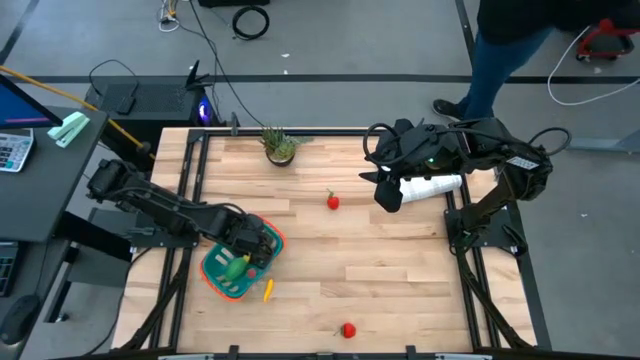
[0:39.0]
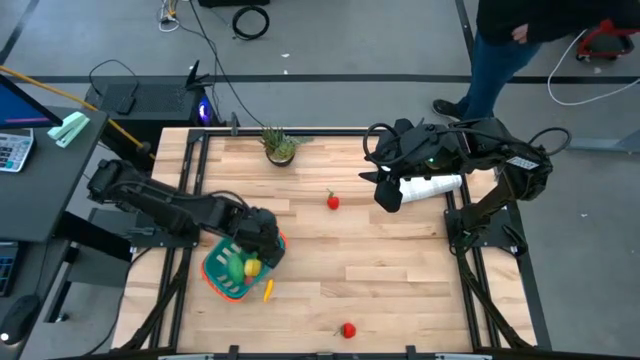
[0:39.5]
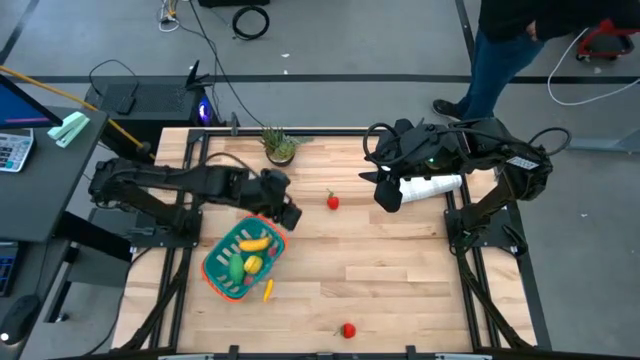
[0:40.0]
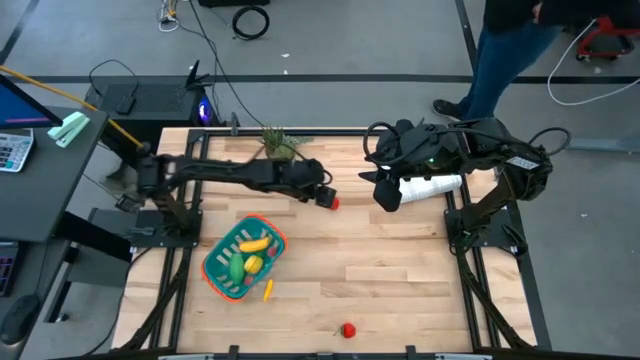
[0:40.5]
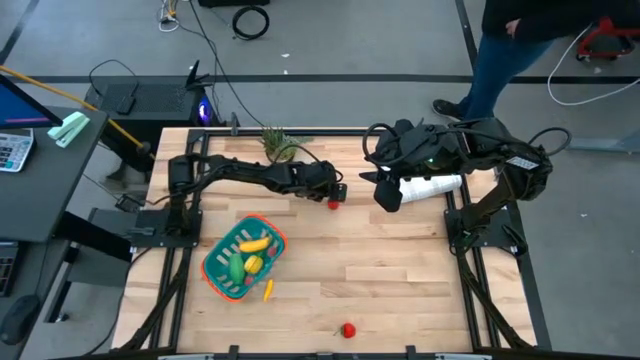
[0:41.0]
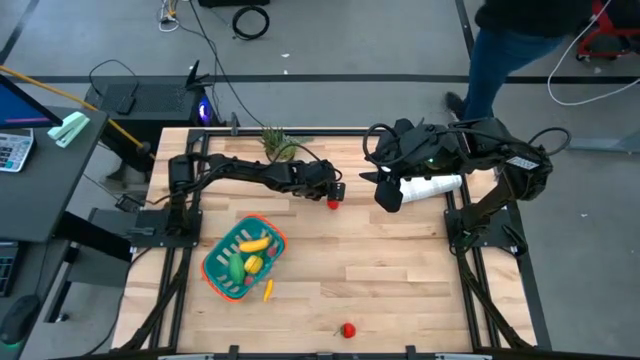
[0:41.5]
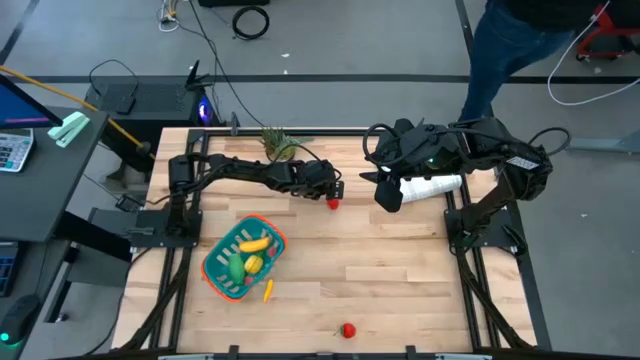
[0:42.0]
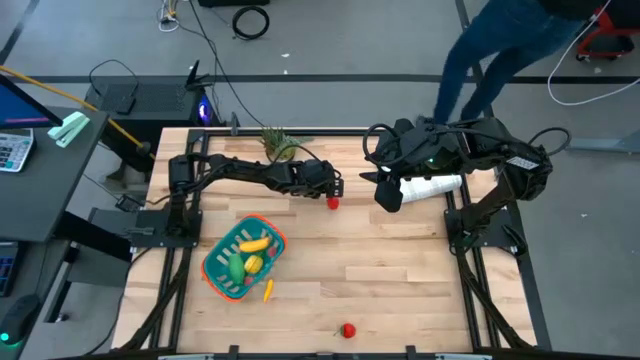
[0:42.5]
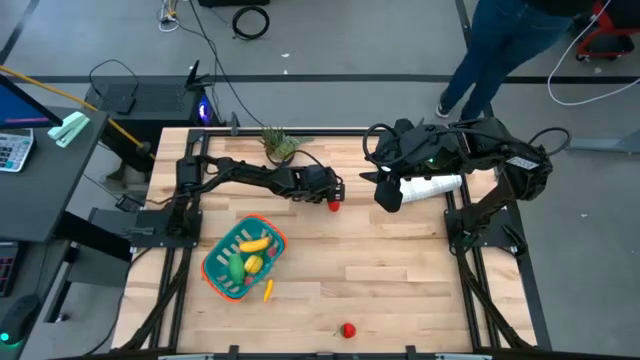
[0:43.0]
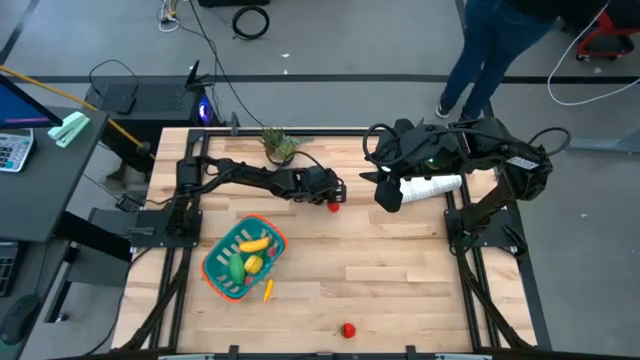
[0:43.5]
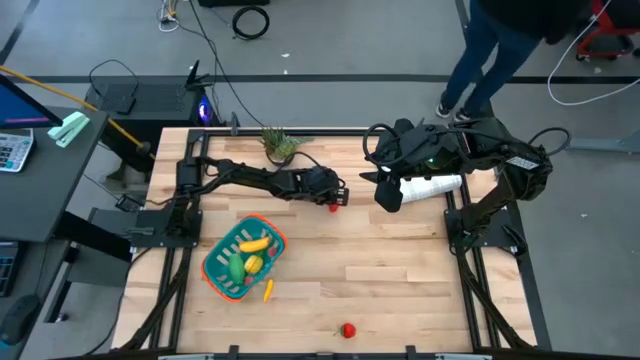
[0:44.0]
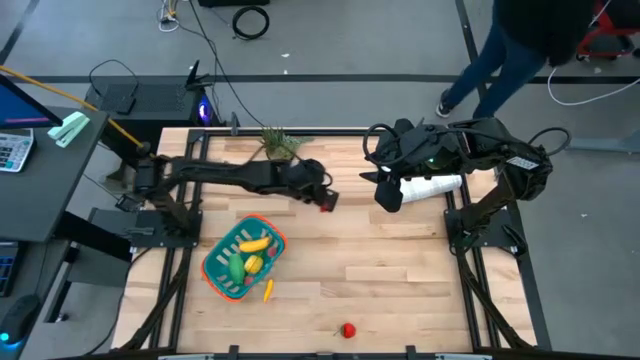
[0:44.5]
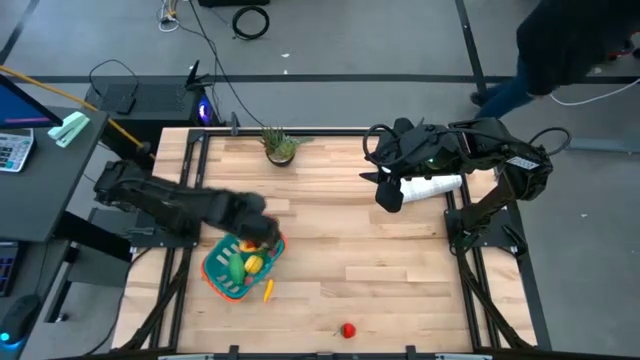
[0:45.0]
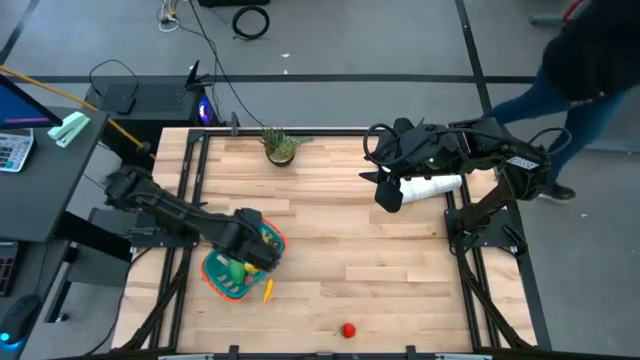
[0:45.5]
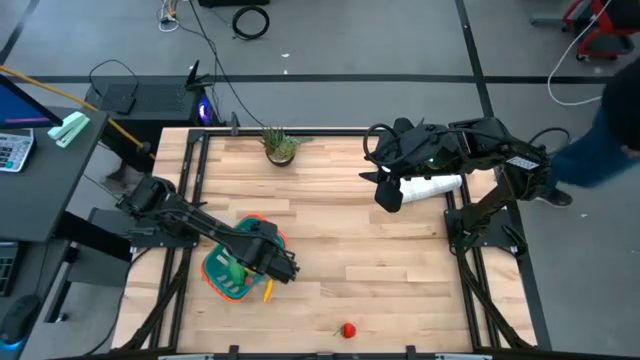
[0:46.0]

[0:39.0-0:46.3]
Task: Pick and placing Produce into tupperware
Put the top red strawberry into the blue basket

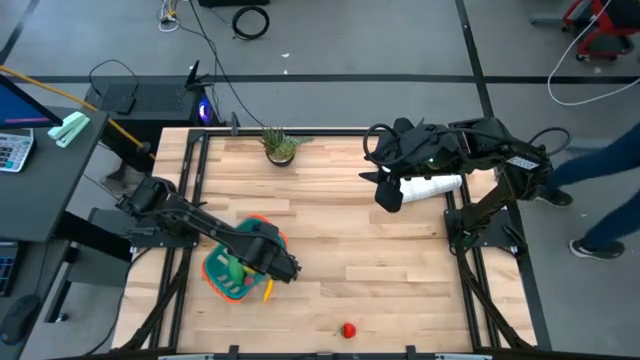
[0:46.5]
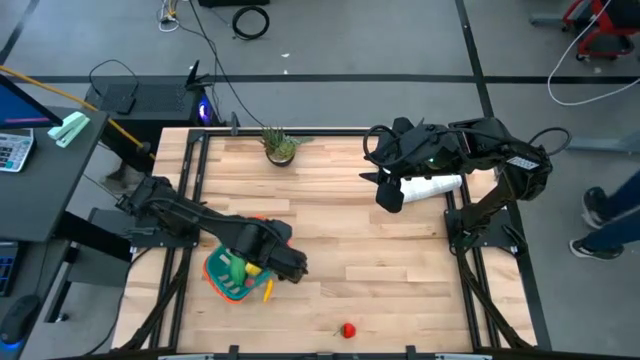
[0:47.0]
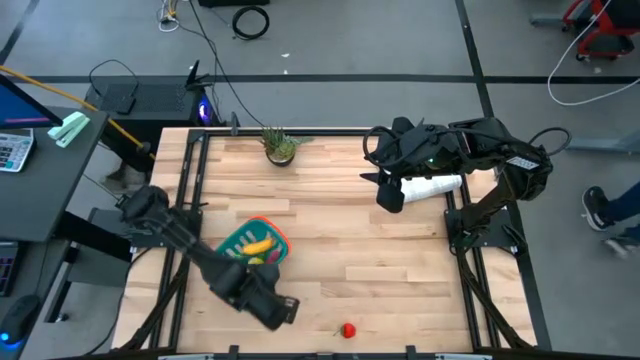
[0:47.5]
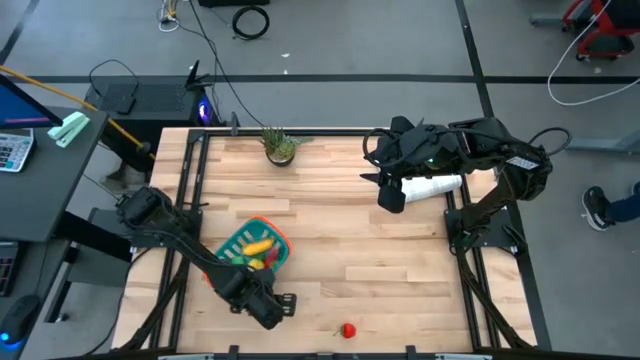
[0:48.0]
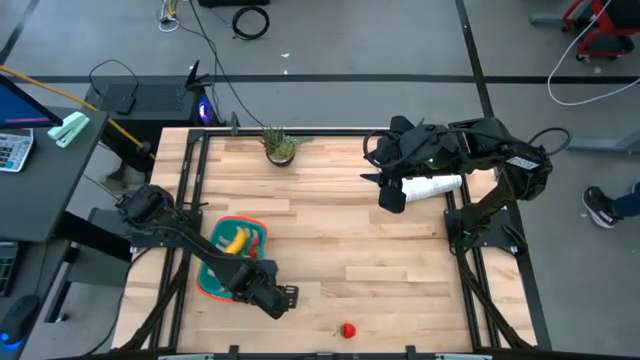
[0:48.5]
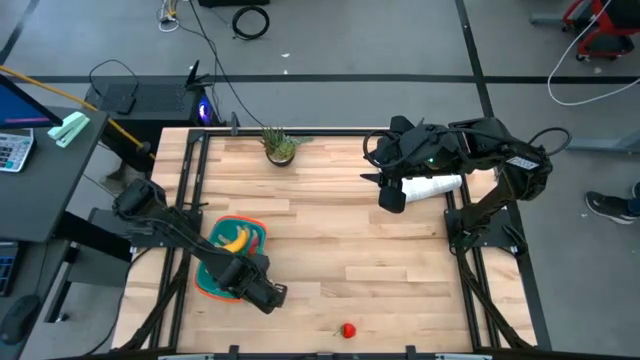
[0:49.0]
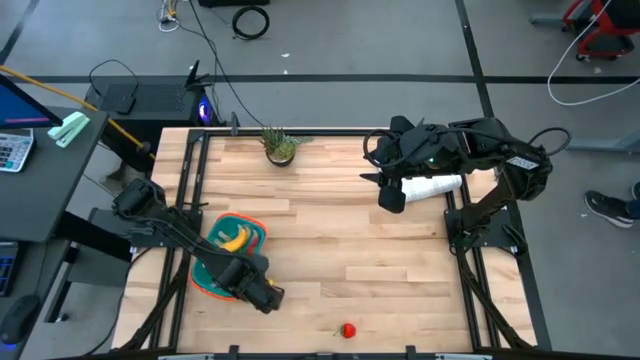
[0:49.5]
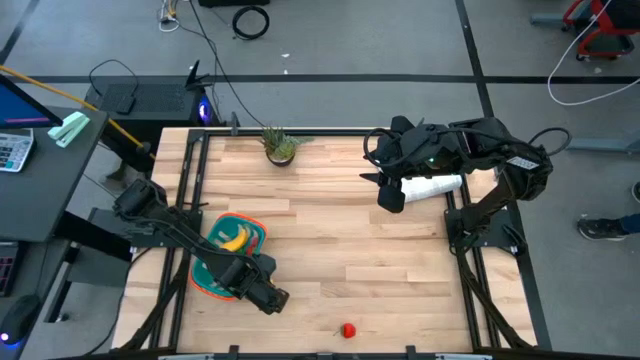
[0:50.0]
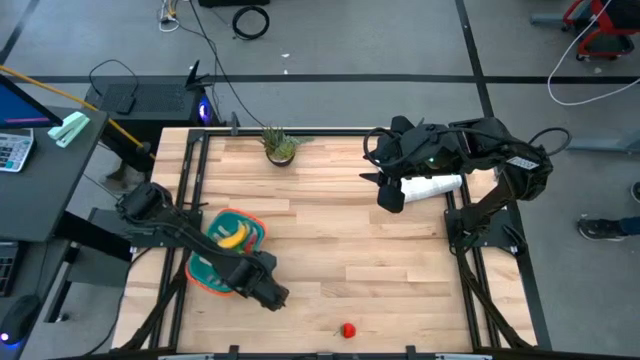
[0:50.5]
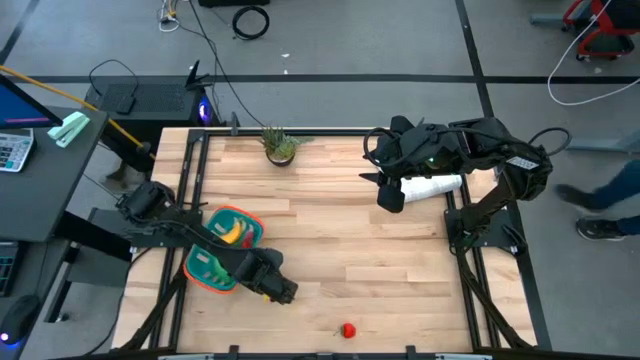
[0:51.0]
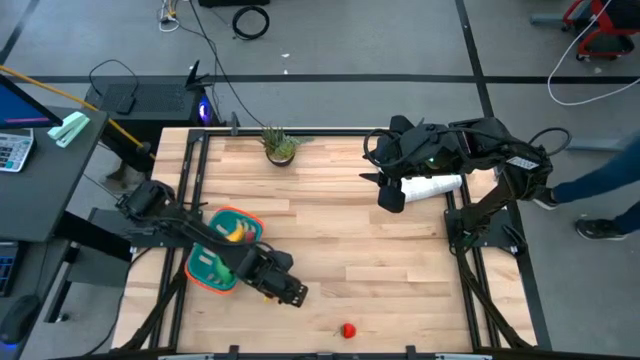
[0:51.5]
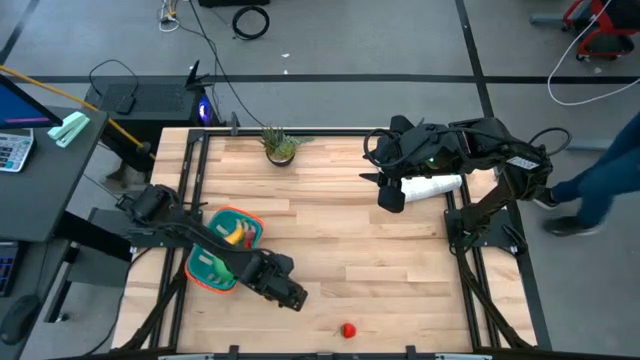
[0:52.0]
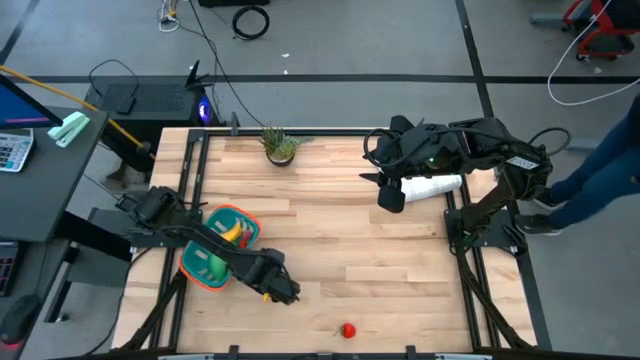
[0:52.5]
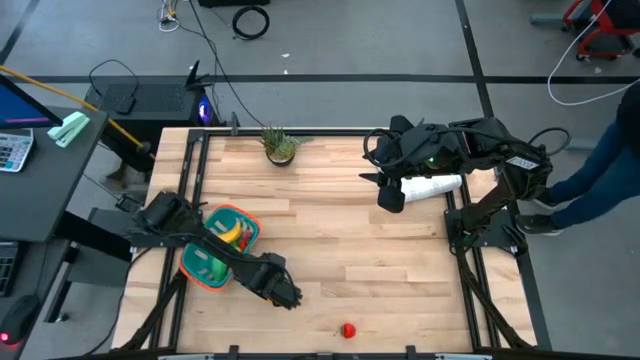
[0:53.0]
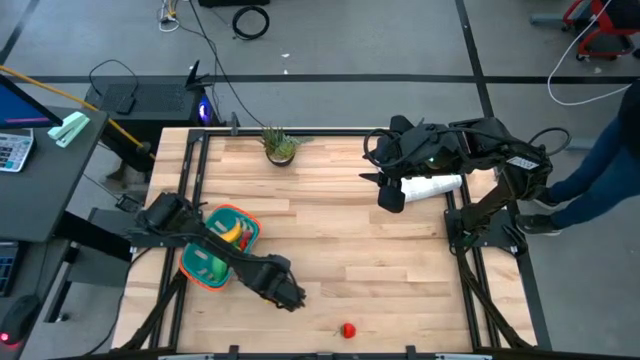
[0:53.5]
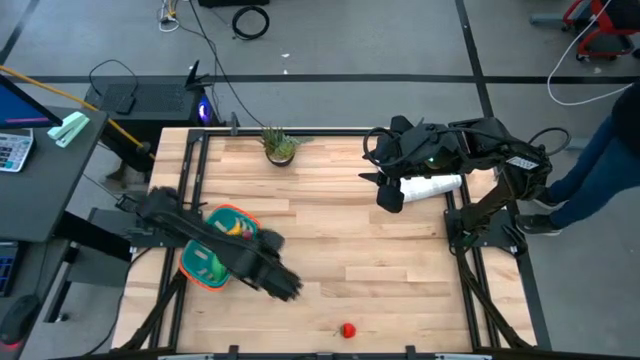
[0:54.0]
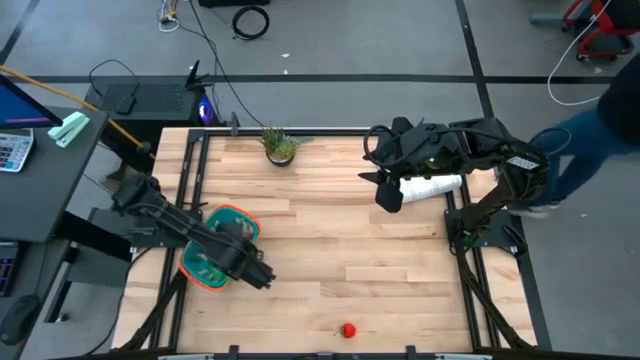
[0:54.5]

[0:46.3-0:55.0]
Put the yellow corn into the blue basket

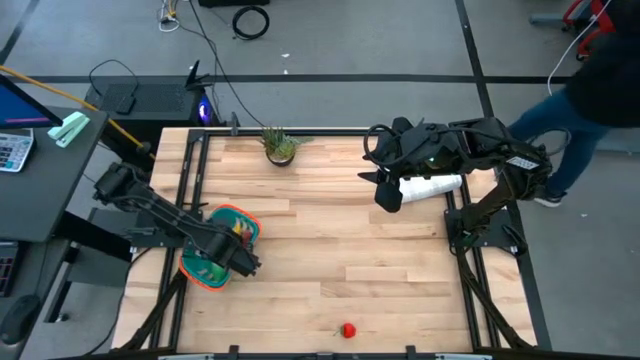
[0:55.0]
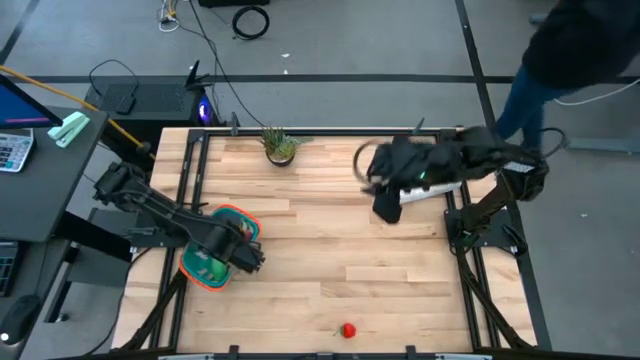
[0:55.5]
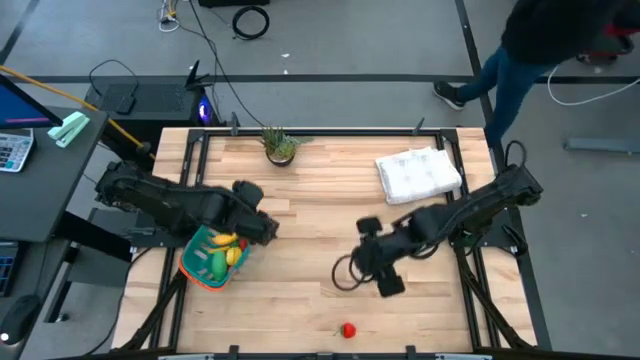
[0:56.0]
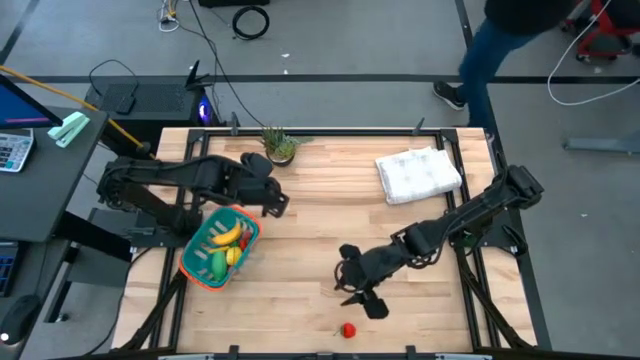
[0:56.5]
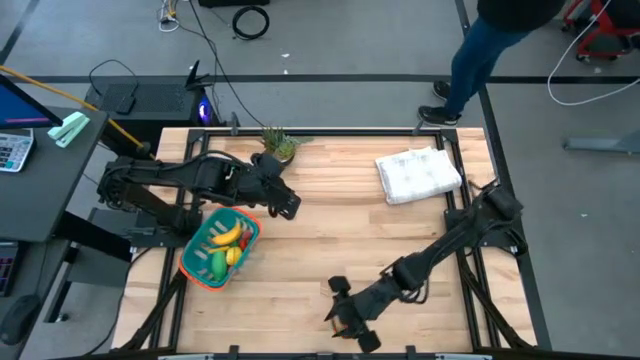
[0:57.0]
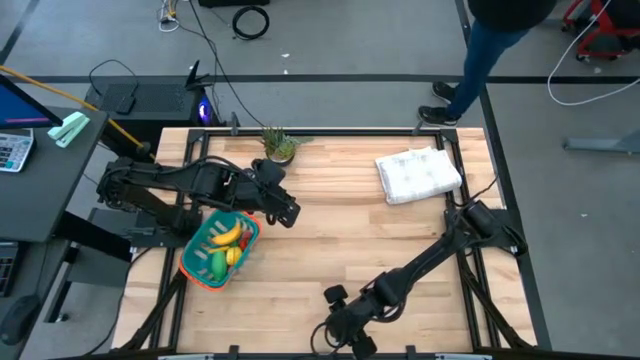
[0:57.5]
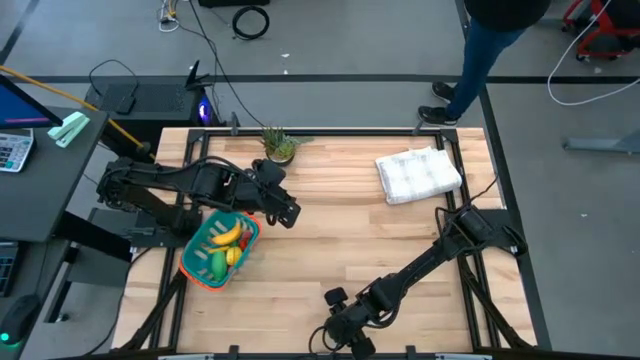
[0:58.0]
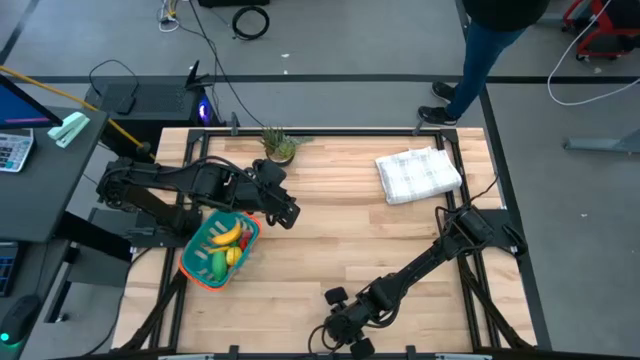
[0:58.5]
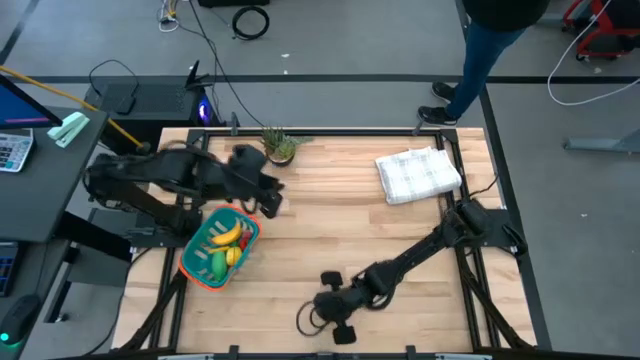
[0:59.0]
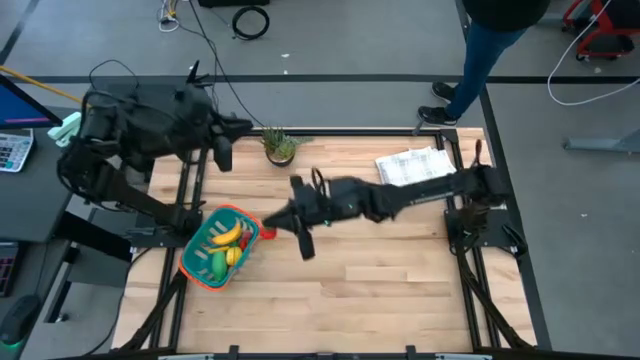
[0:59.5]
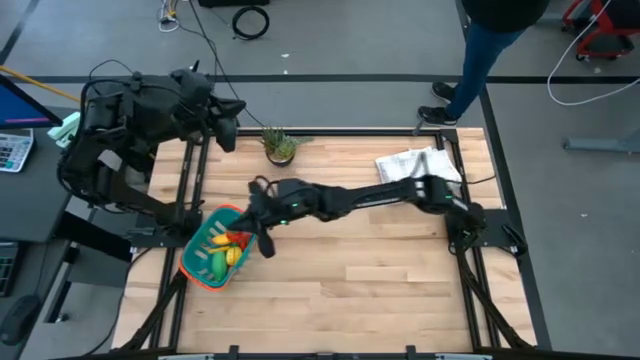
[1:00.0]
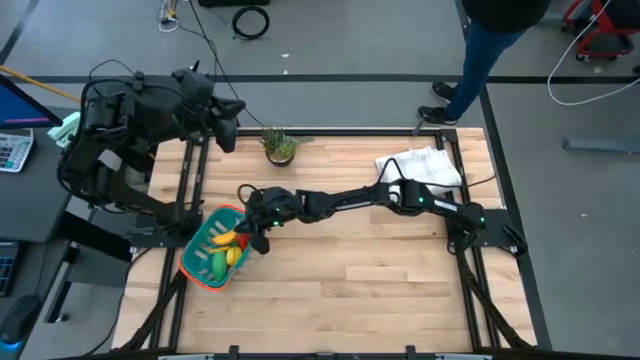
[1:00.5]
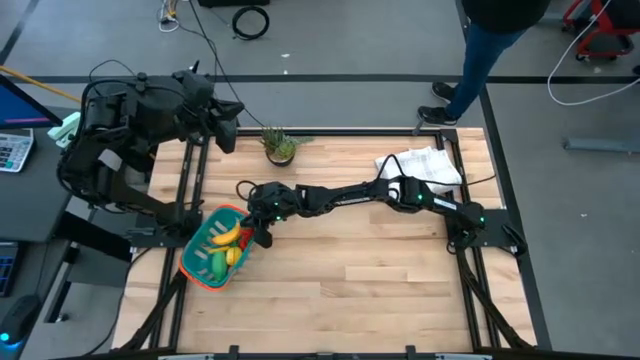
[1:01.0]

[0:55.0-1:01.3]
Put the red strawberry into the blue basket
